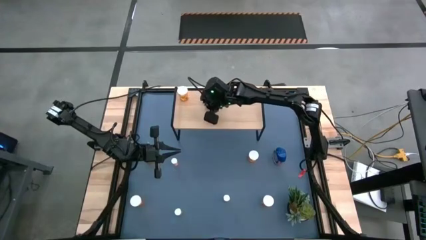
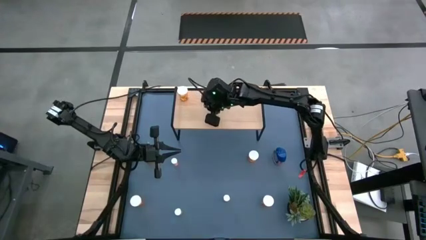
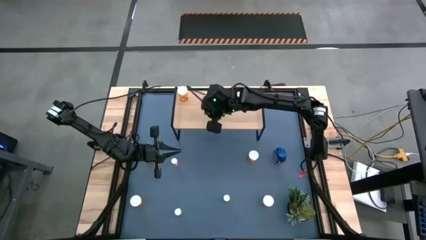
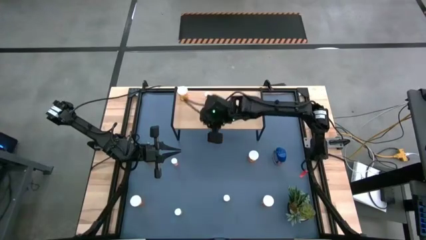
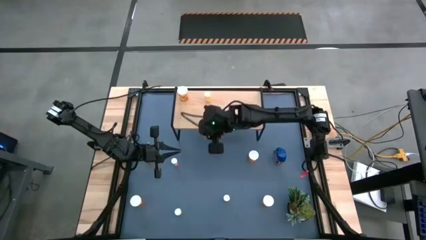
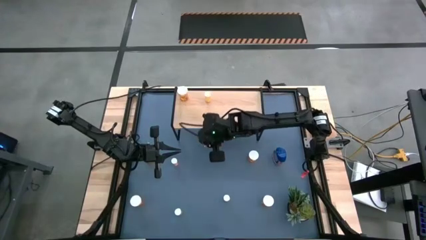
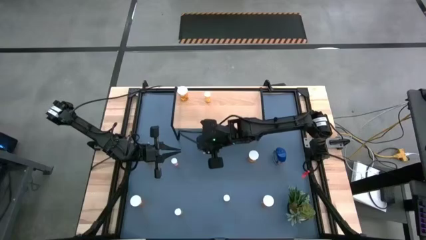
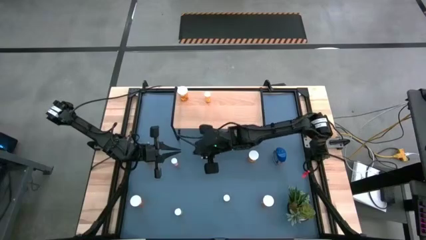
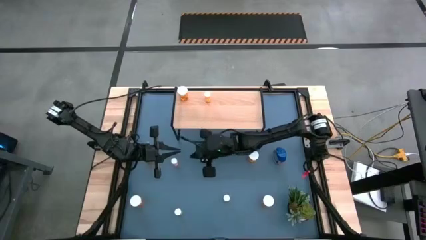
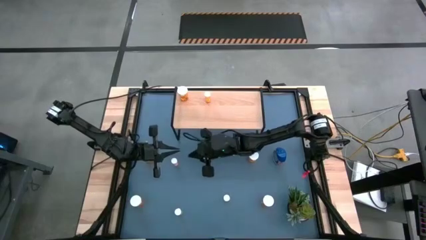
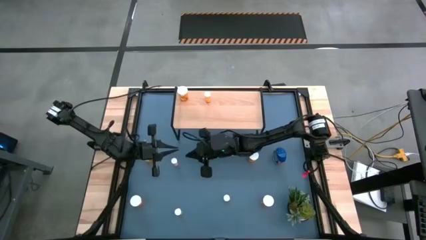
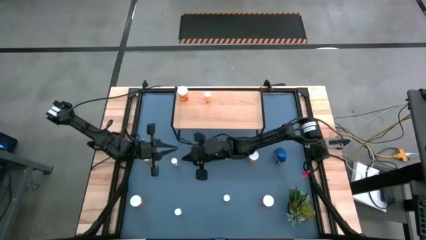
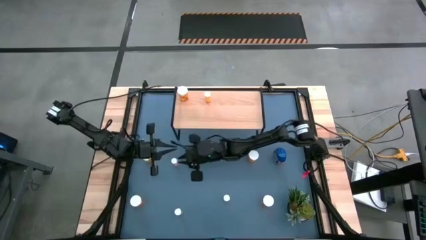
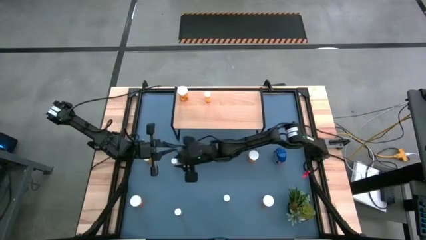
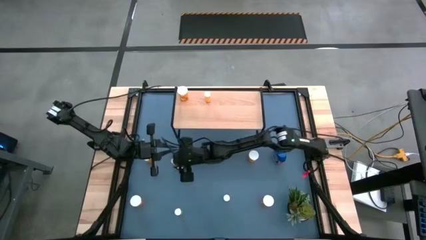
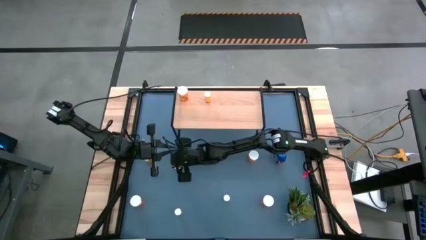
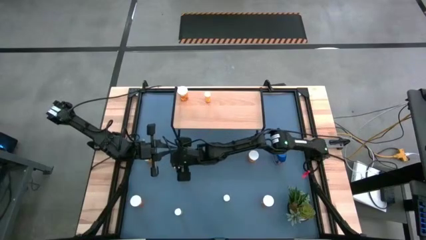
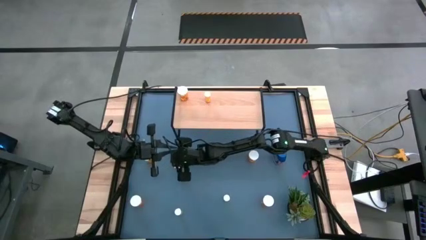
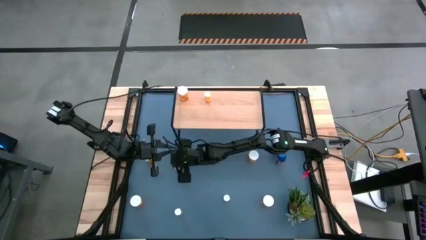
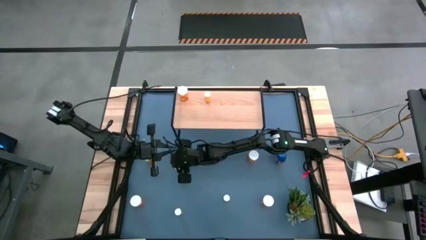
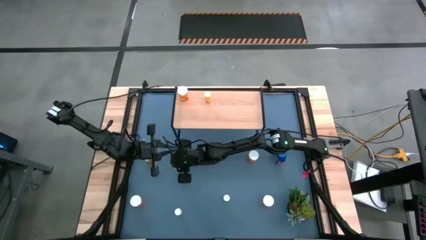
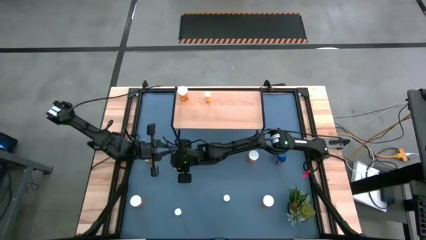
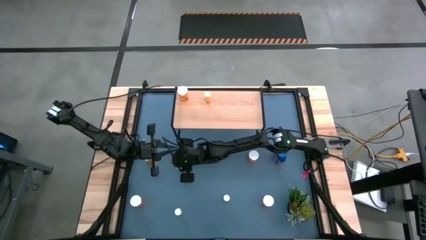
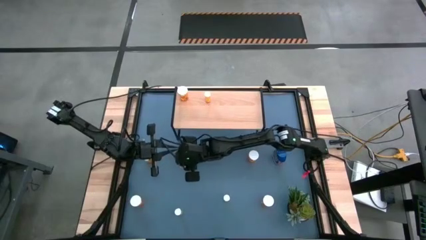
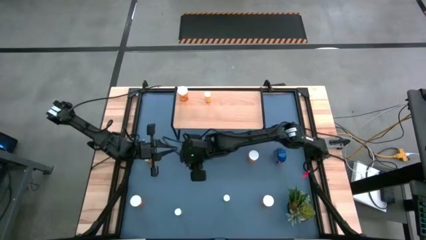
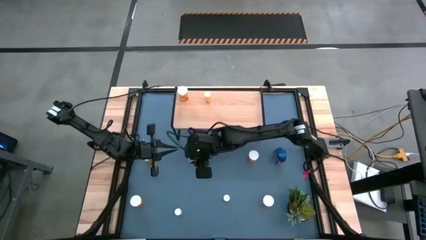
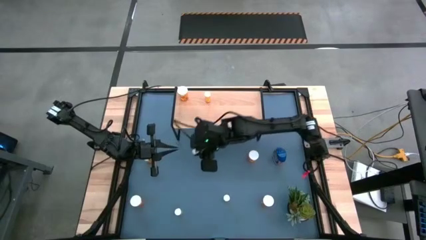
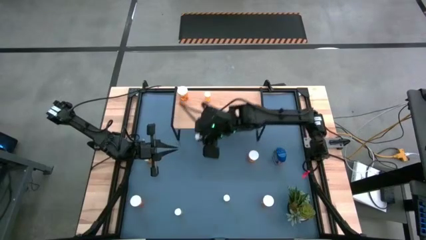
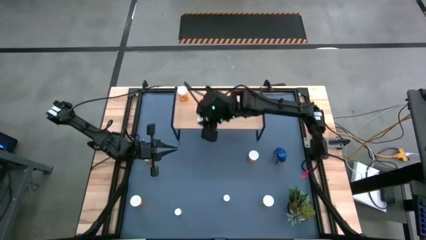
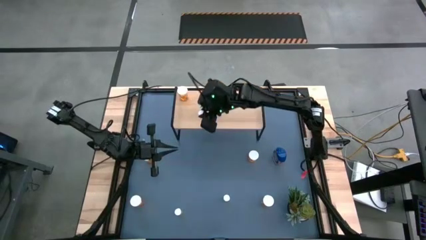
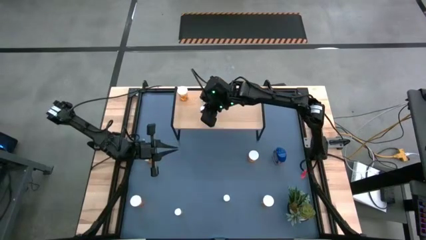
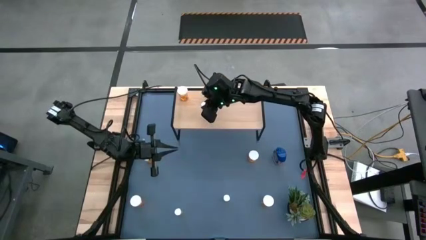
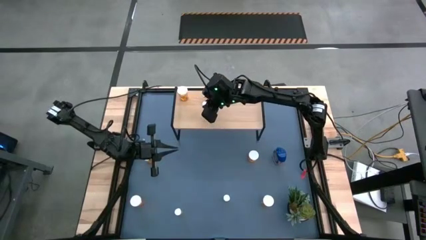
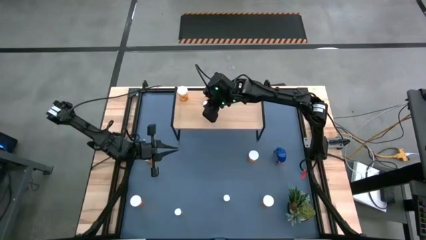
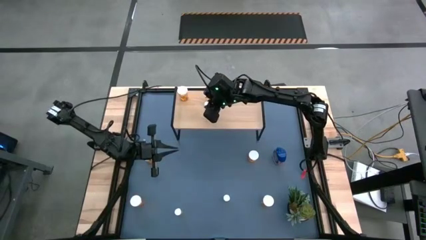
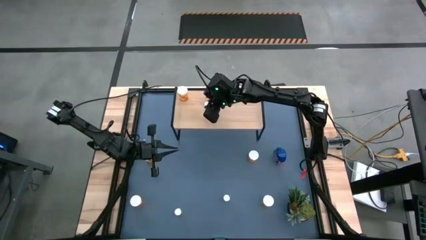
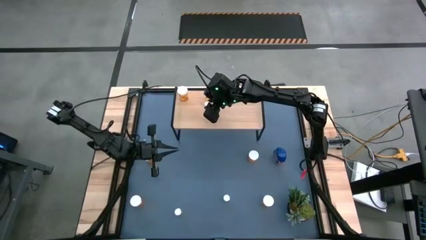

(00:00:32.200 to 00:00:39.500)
Task: Pick and place medicine bottles onto shelf by color
Put the small pill bottle on the shelf

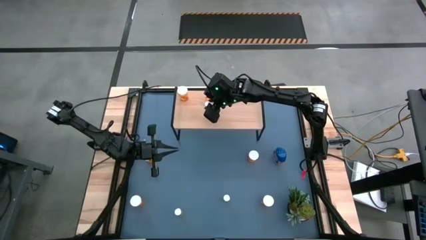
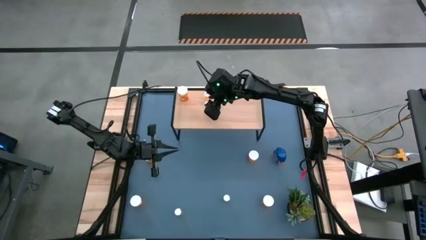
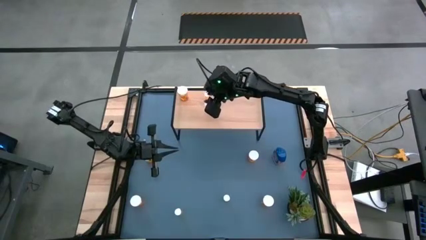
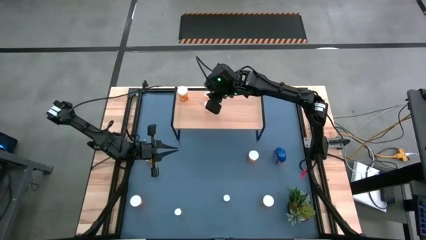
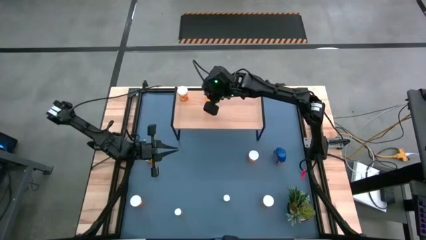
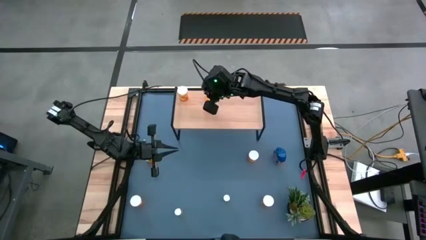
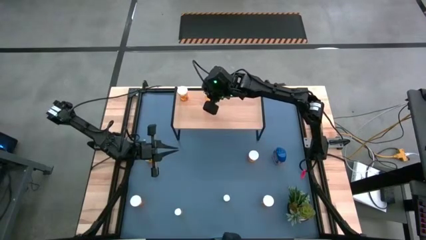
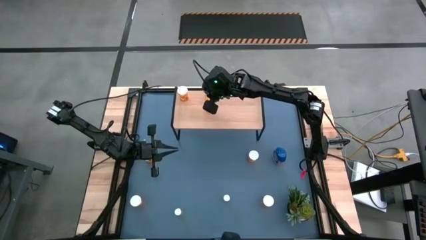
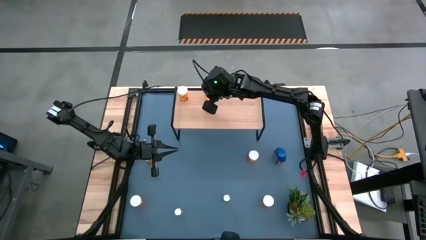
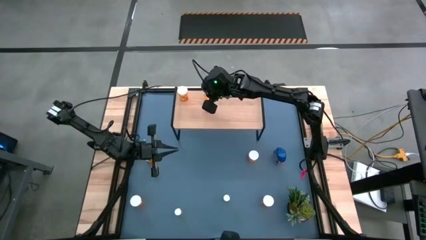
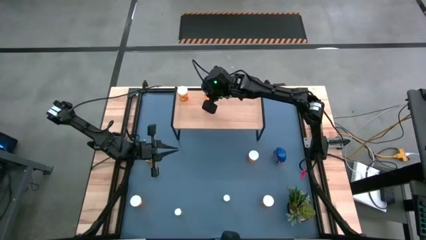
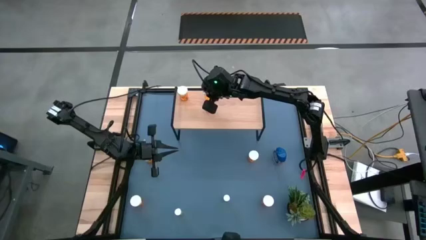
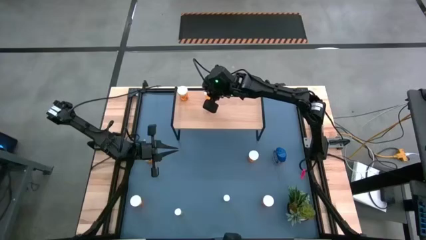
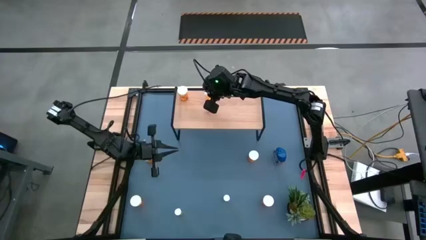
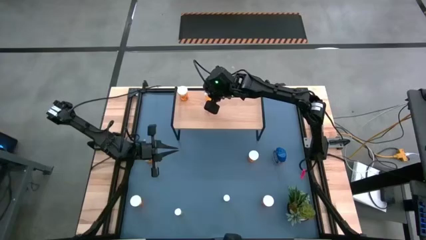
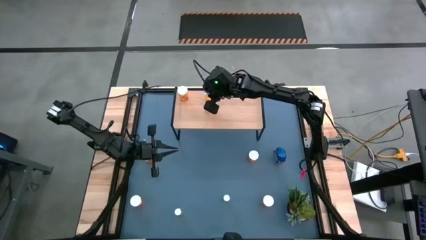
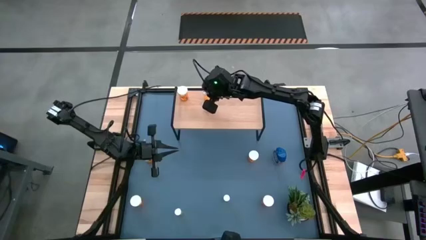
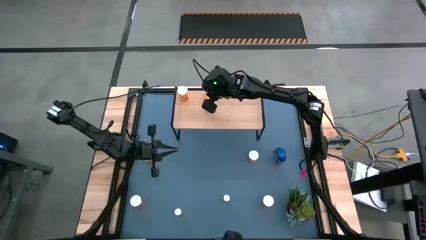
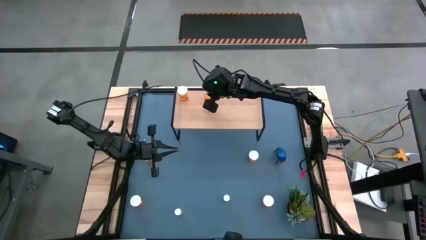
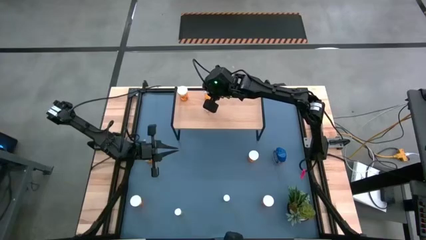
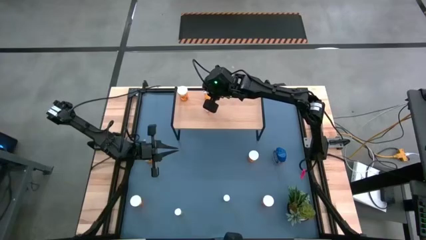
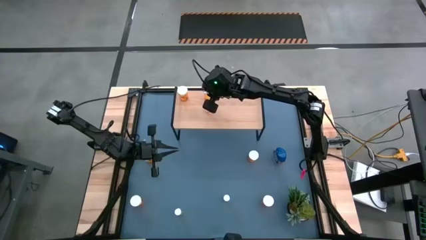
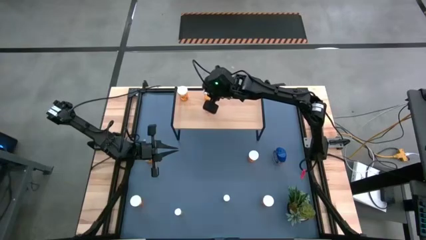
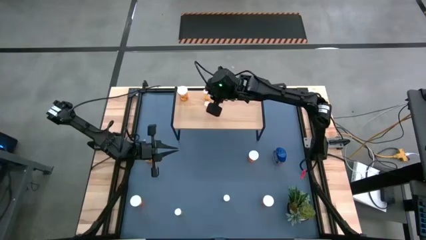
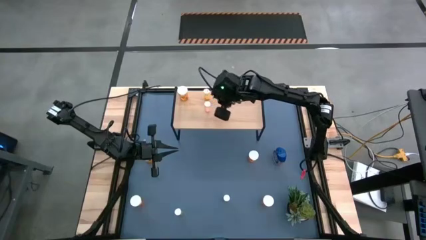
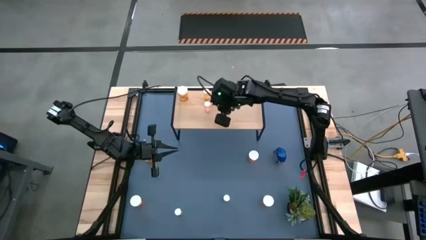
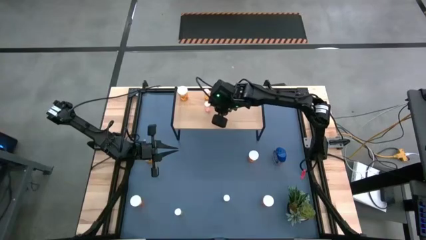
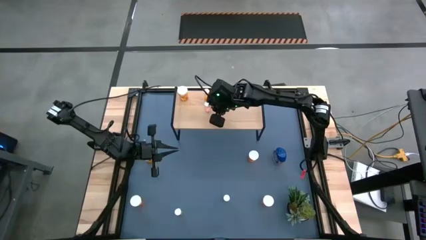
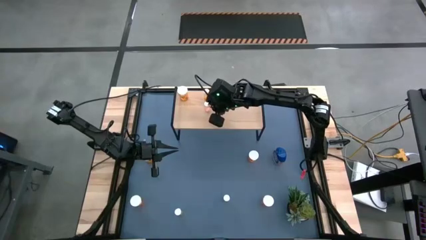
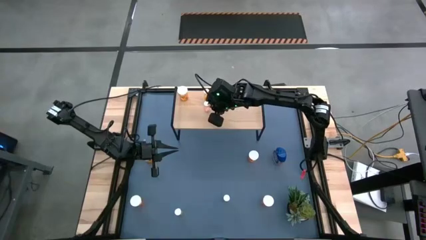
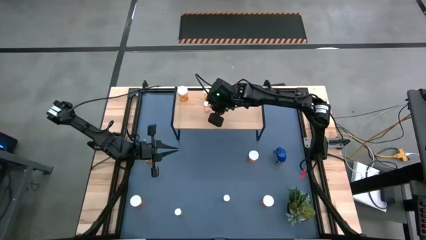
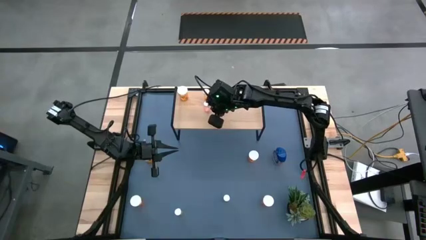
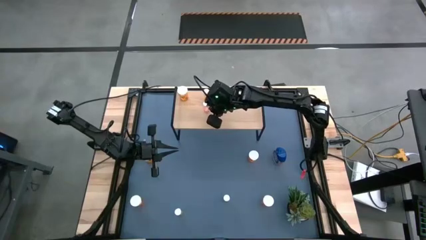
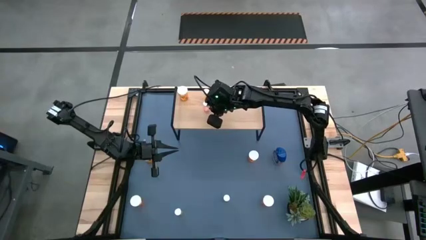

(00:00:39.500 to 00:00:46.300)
Adjust the small pill bottles
